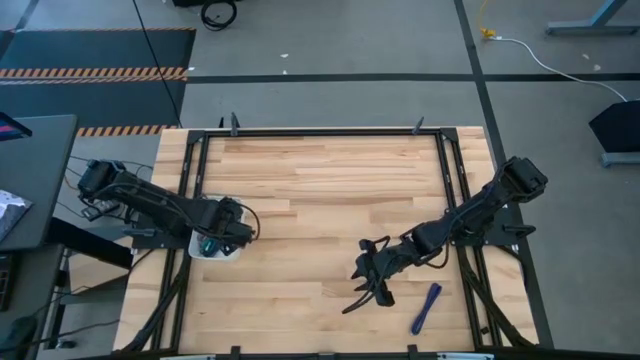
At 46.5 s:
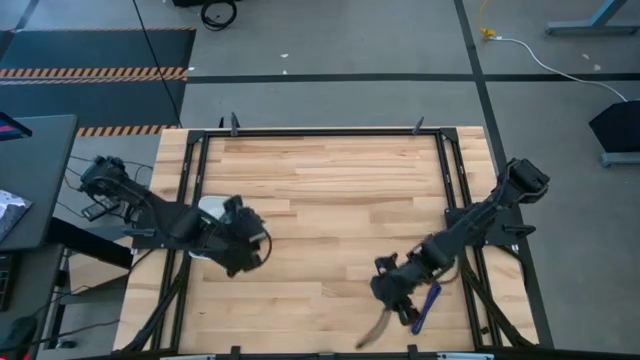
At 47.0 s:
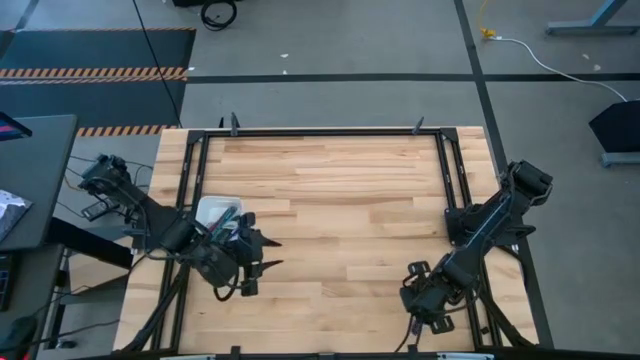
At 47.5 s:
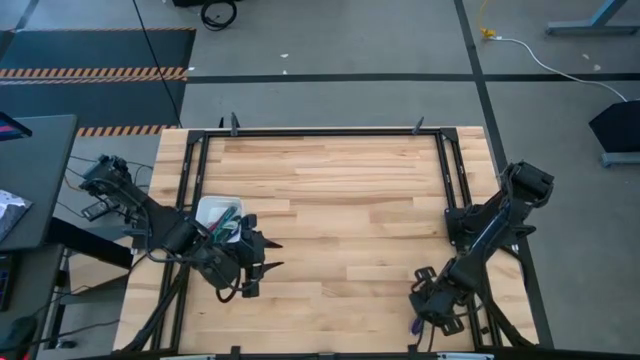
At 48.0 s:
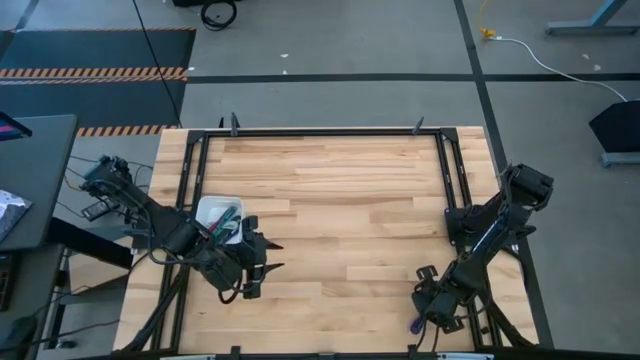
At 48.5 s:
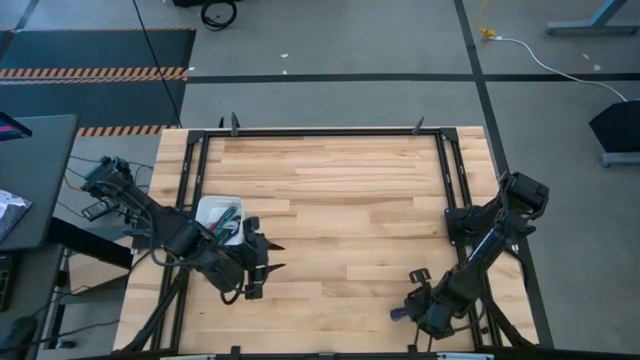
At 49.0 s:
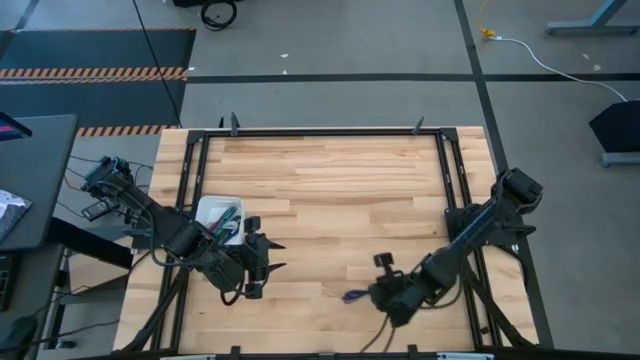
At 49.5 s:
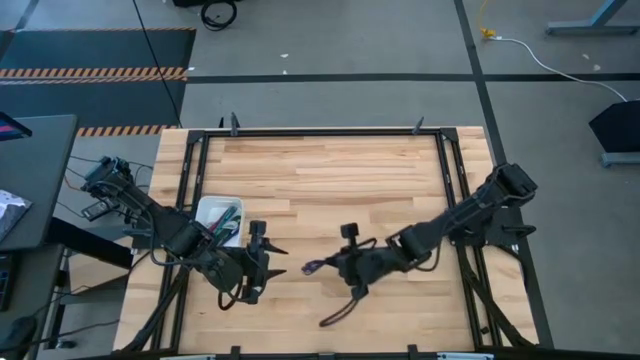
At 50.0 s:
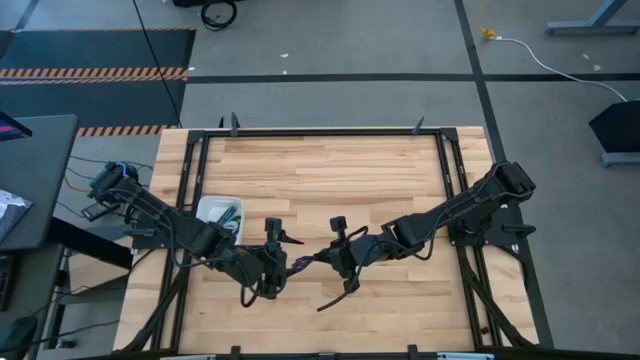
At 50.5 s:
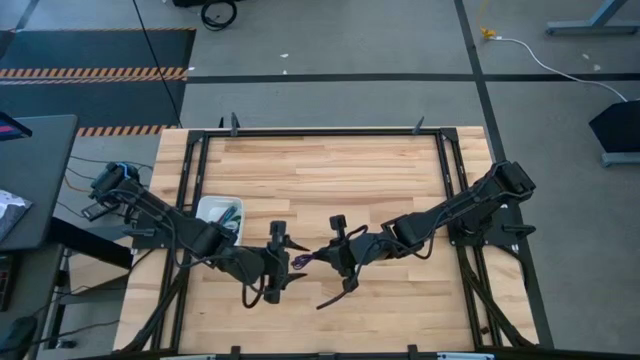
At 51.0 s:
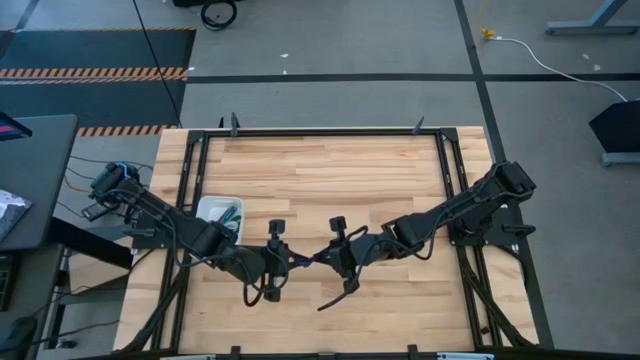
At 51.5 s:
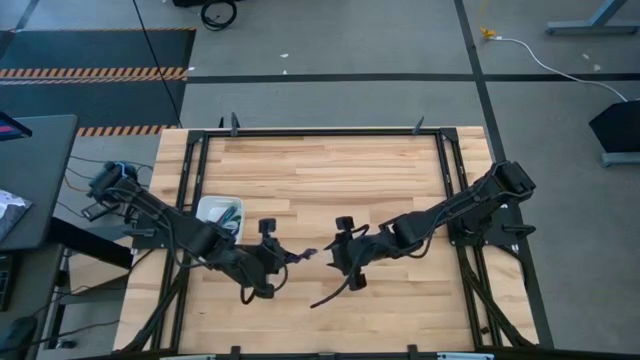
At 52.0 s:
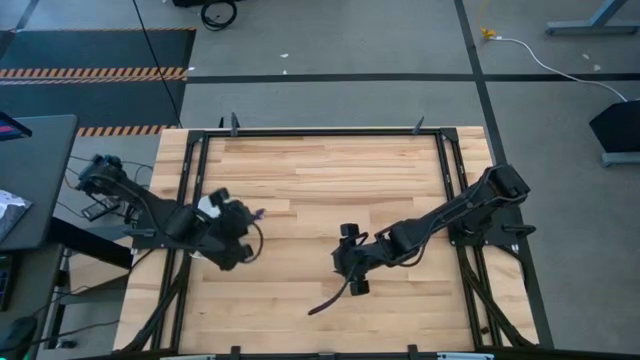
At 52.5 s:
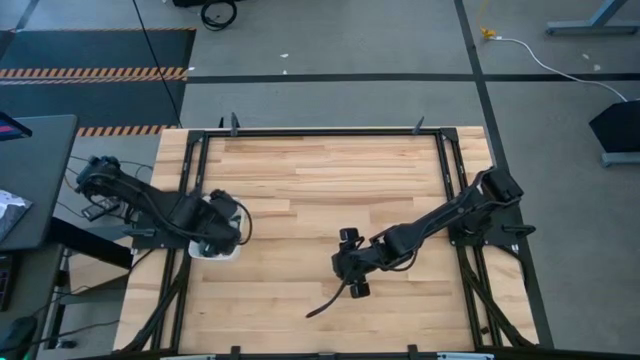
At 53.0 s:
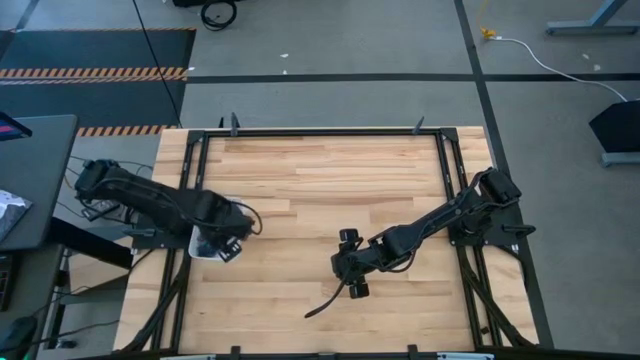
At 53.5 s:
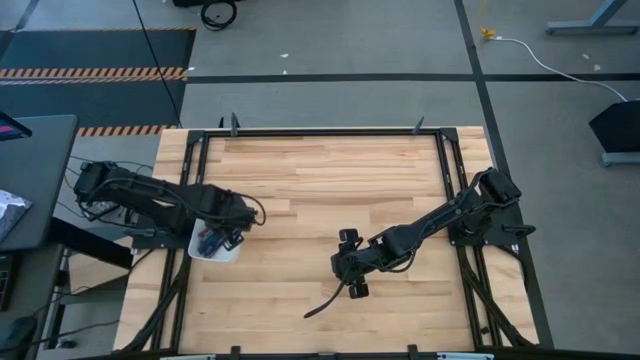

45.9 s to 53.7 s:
Task: Pick and place USB-C Cables
Put the dark blue charger cable into the white bin

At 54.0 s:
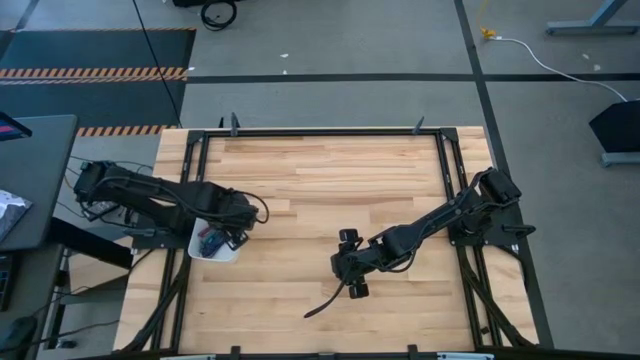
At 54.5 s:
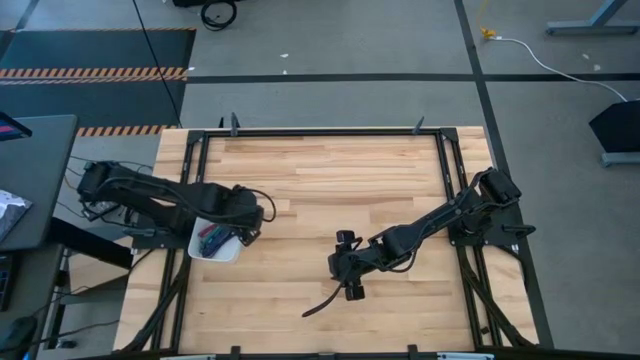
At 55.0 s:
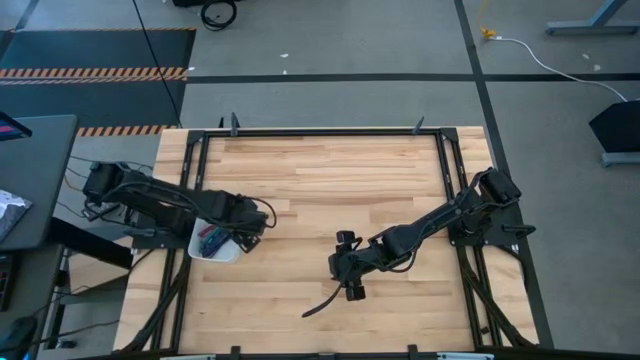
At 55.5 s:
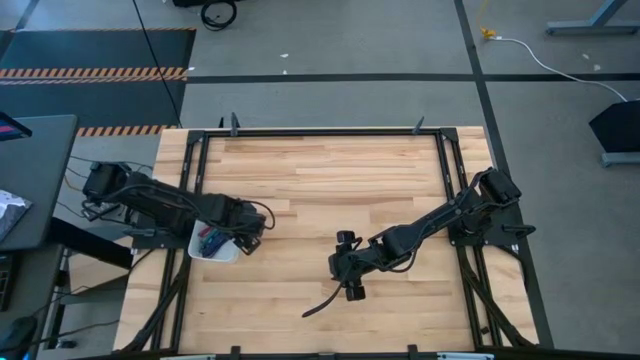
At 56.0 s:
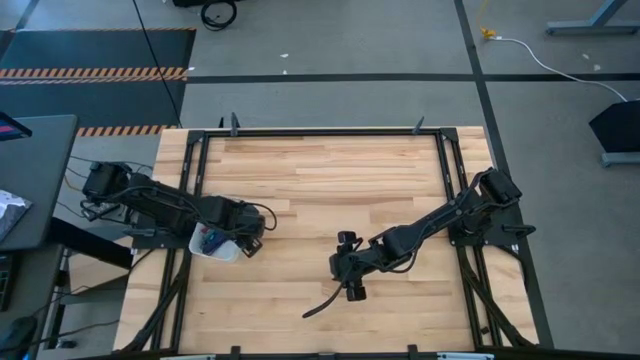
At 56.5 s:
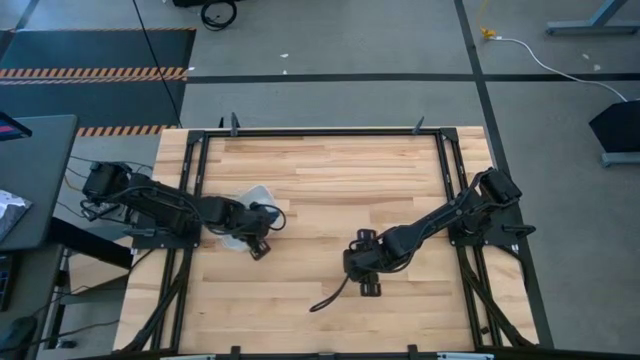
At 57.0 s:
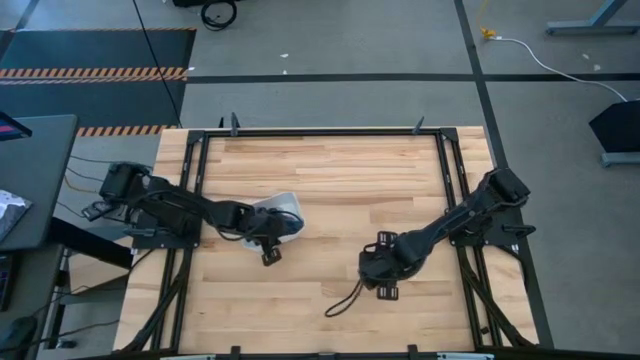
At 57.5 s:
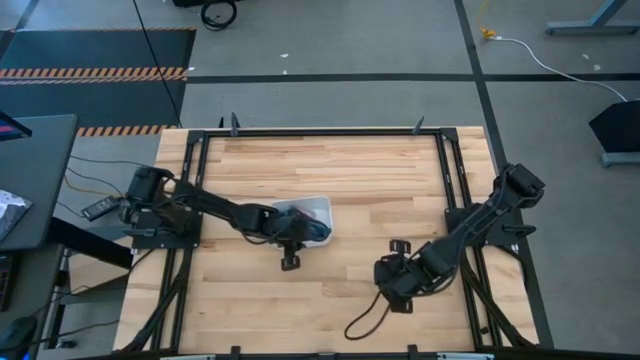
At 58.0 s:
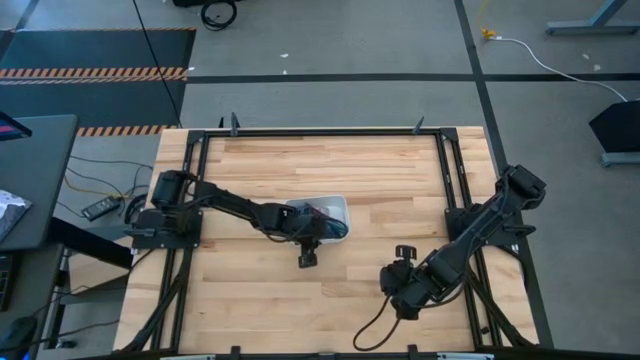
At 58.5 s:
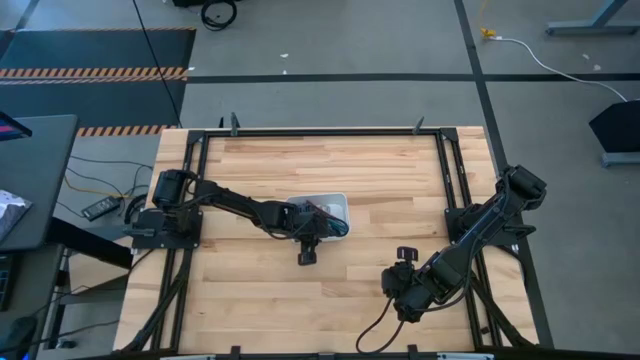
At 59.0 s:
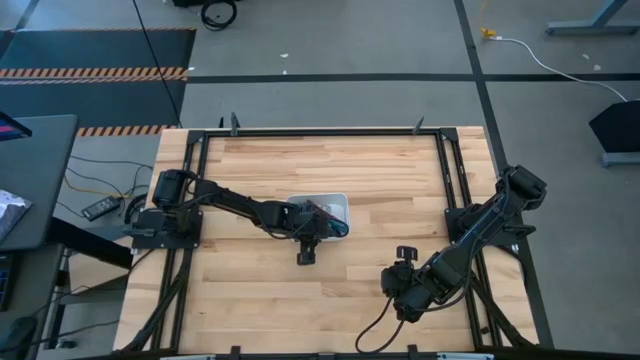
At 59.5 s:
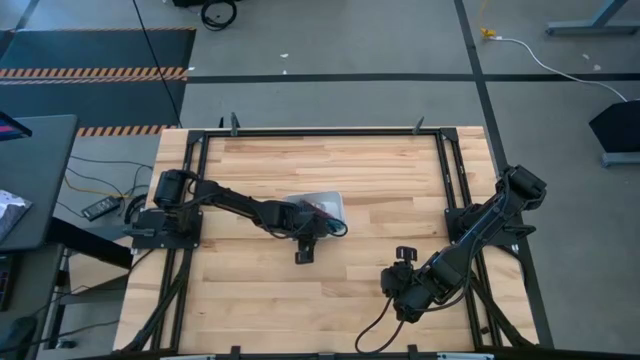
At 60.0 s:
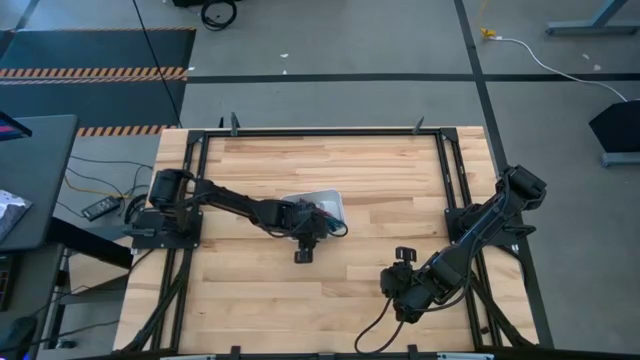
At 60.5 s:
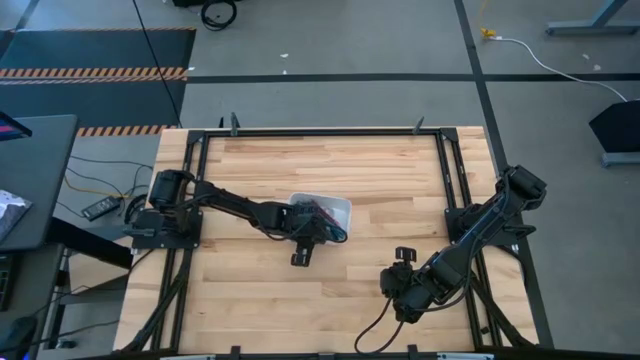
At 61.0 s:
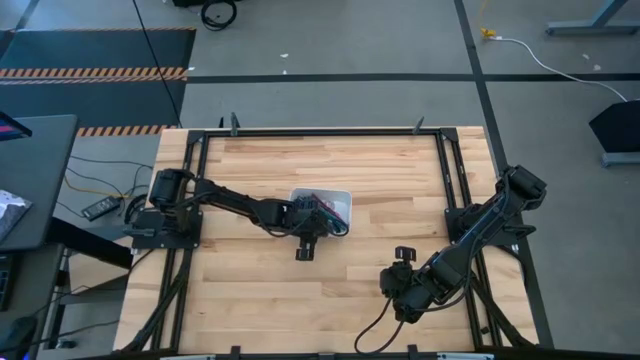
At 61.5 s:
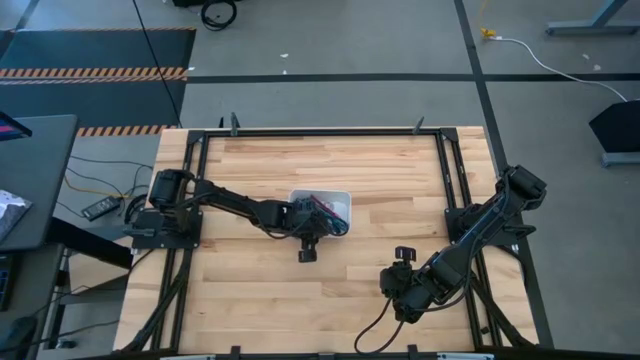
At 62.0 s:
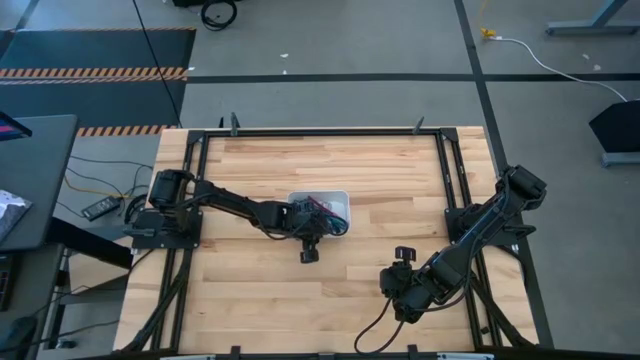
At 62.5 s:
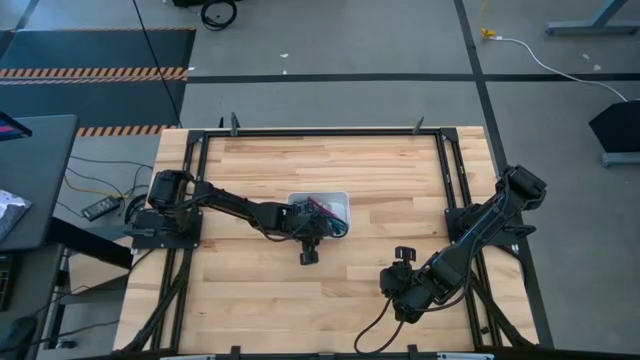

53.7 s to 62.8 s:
Move the white bin to the center of the table

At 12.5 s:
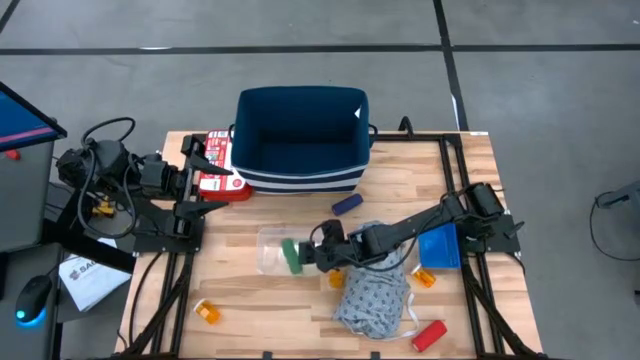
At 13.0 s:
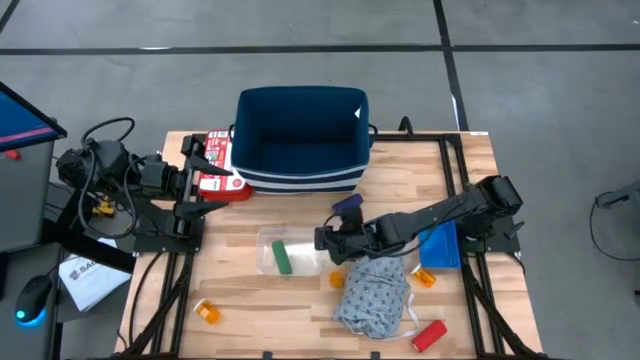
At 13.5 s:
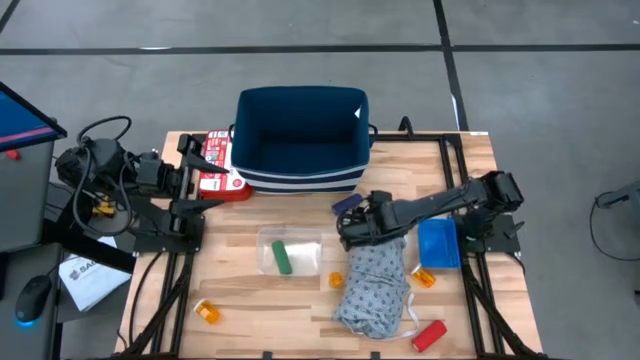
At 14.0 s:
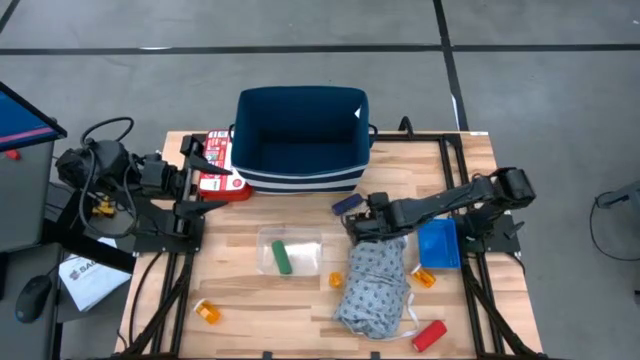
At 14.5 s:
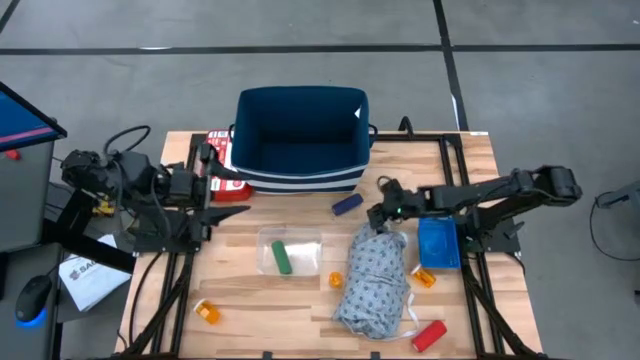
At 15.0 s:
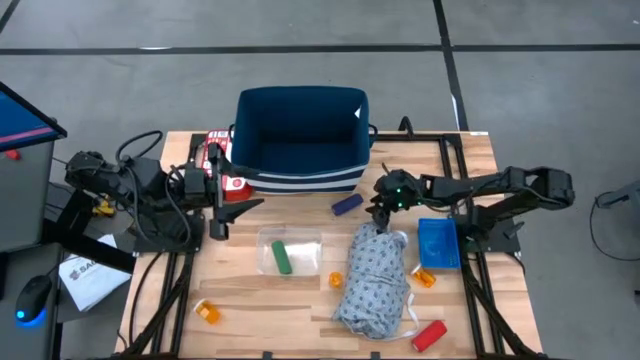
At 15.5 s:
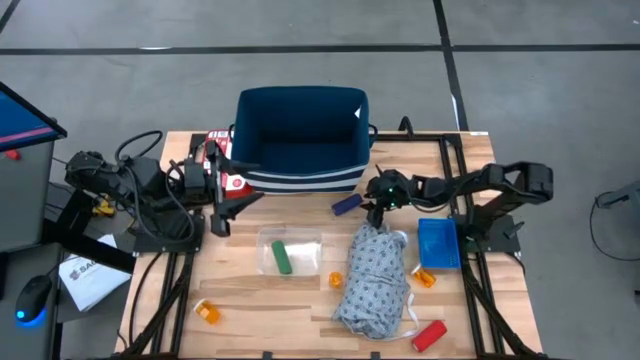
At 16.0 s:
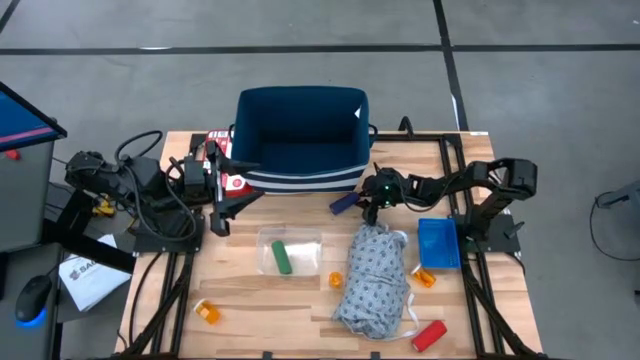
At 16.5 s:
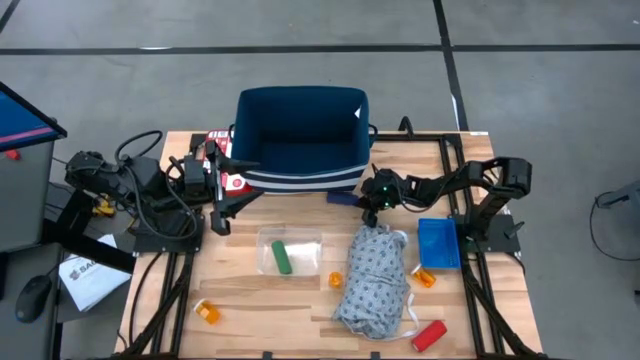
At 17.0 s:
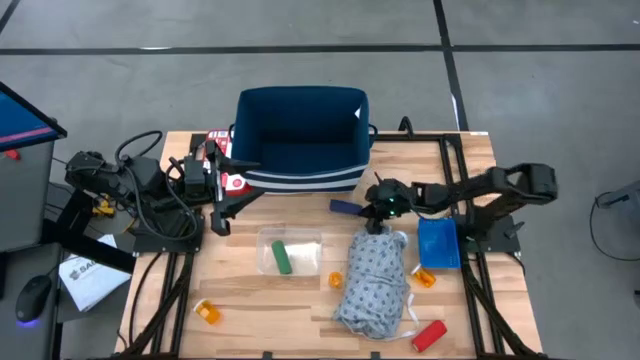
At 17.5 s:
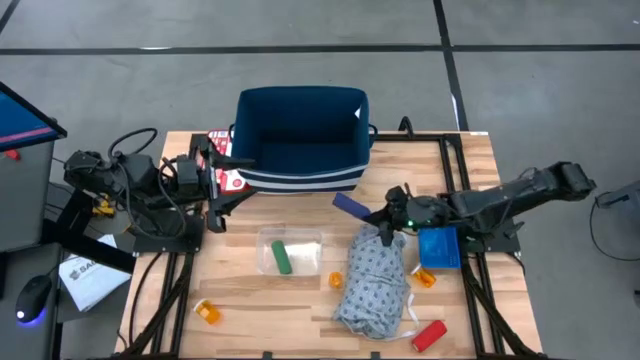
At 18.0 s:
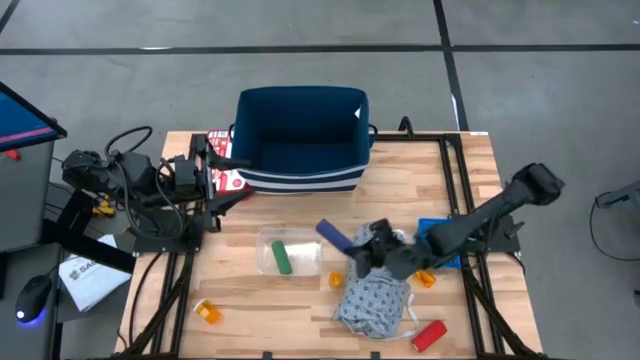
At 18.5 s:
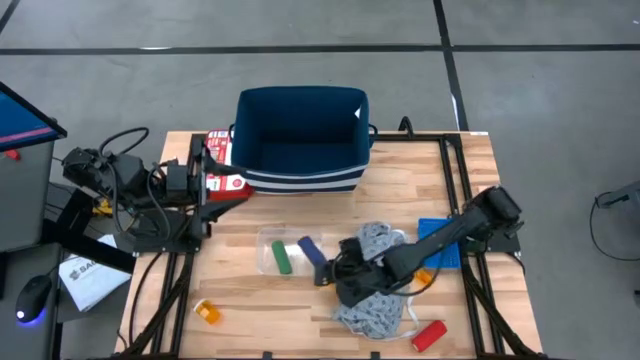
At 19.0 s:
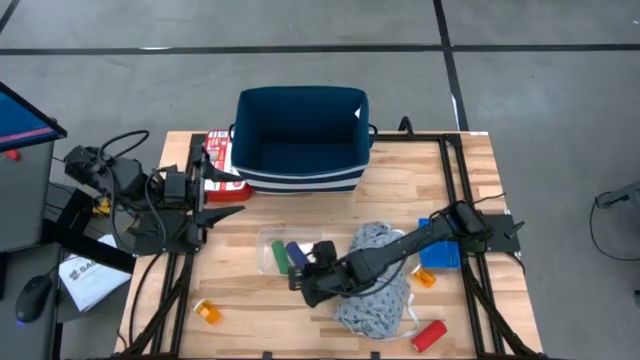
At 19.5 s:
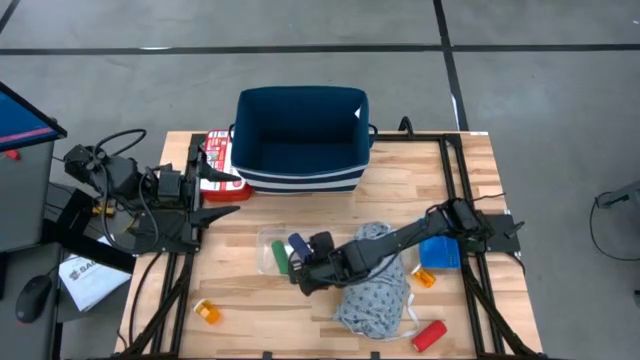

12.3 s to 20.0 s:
Task: Pick & place medical supplies in basket/bin
Put the blue bandage into the transparent bin
